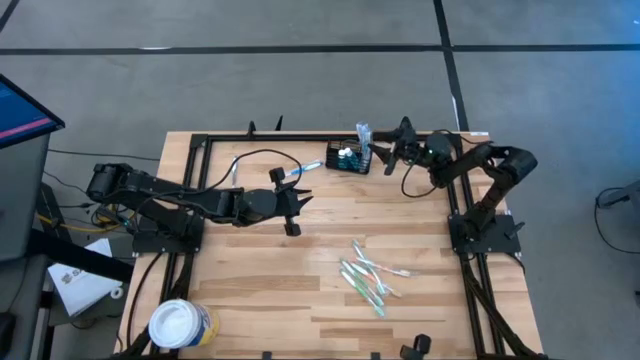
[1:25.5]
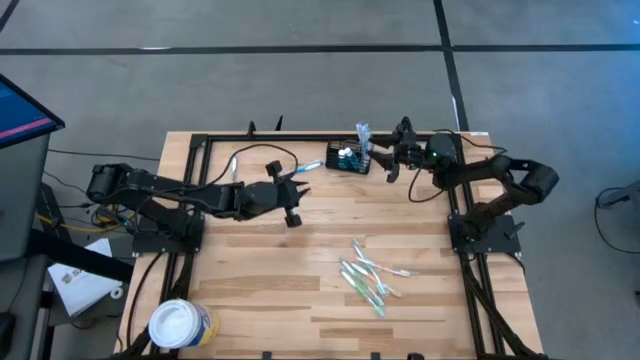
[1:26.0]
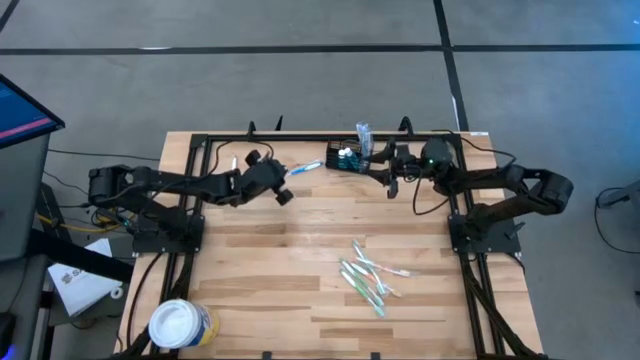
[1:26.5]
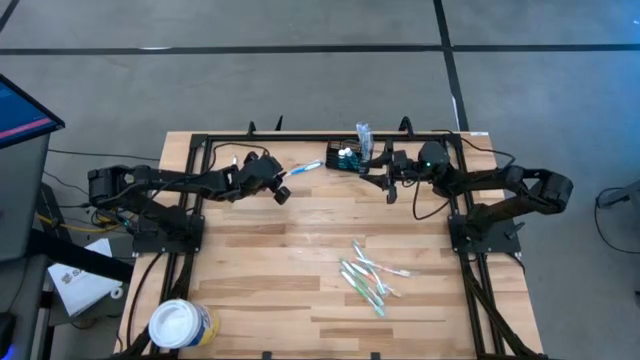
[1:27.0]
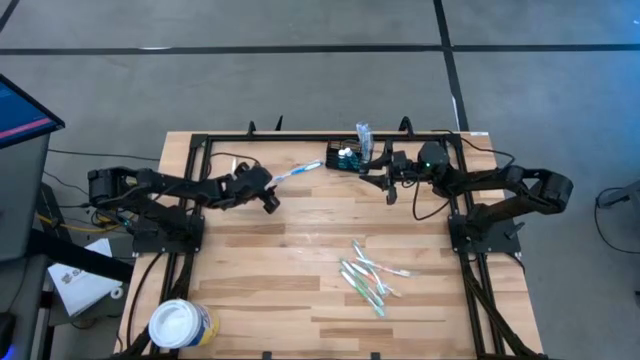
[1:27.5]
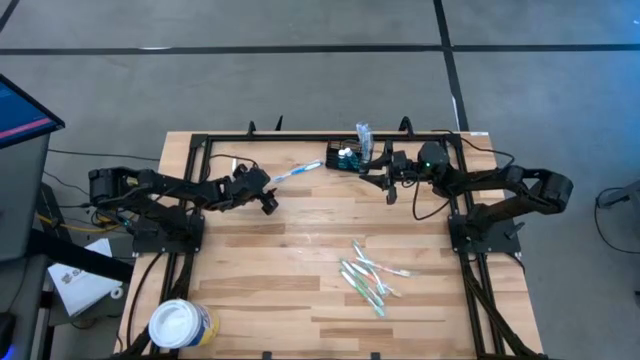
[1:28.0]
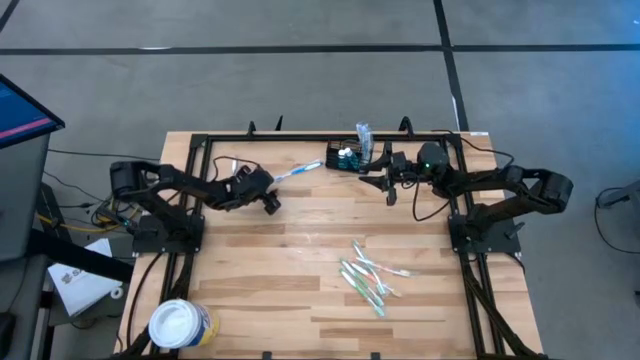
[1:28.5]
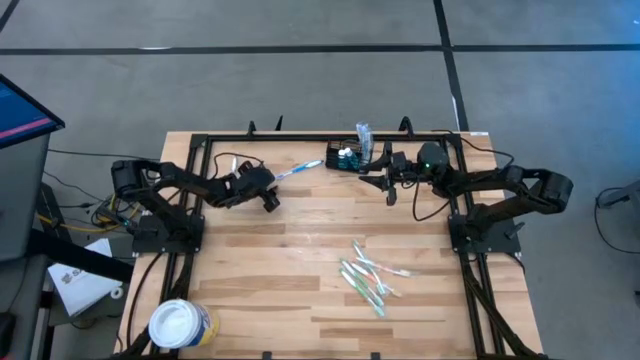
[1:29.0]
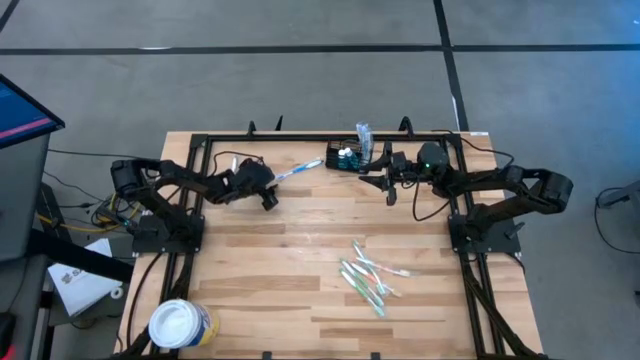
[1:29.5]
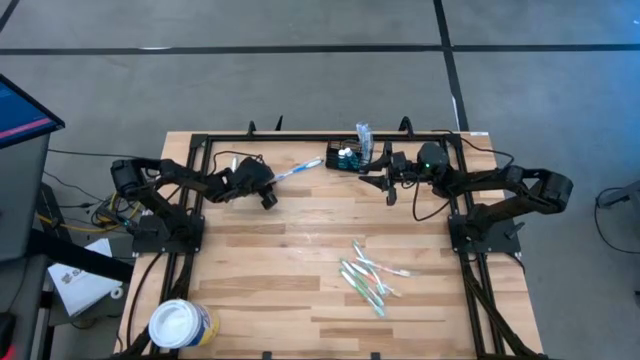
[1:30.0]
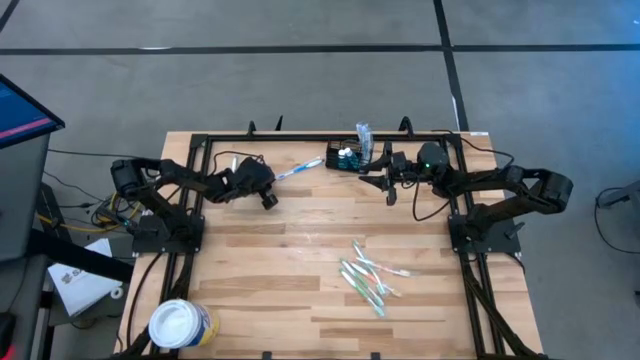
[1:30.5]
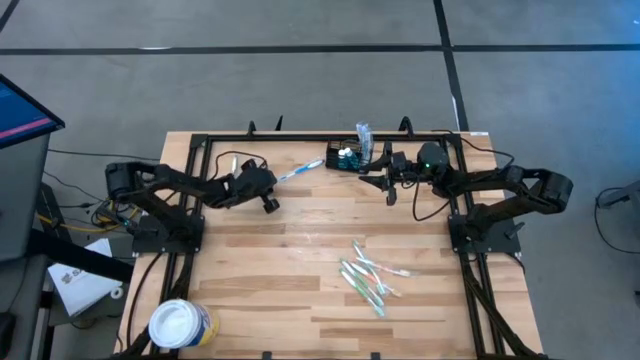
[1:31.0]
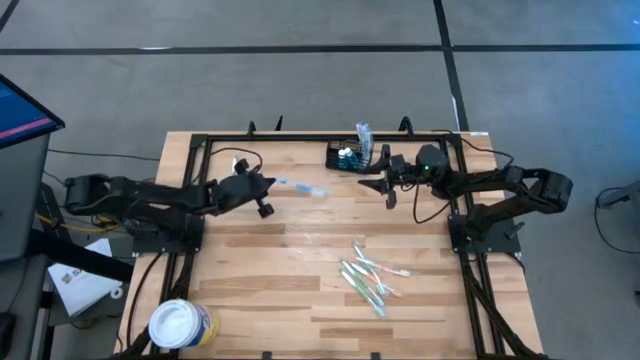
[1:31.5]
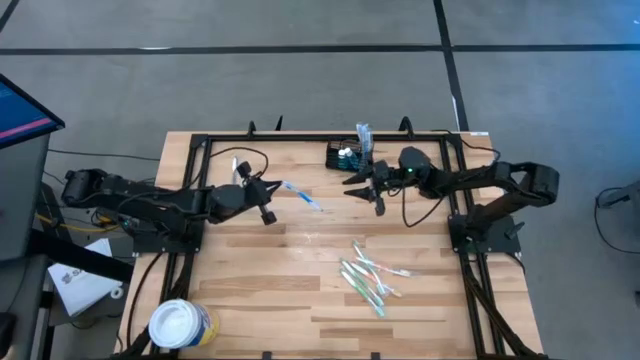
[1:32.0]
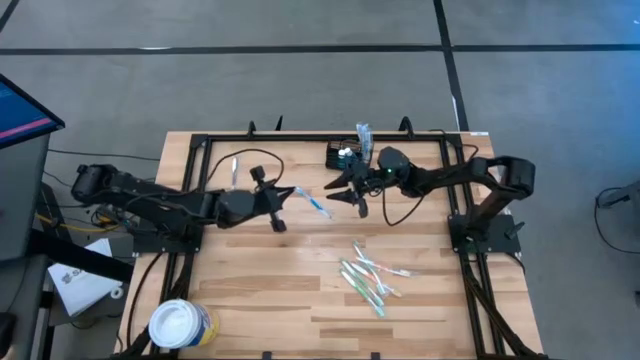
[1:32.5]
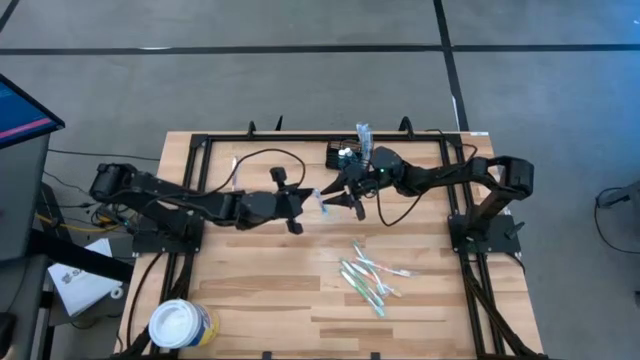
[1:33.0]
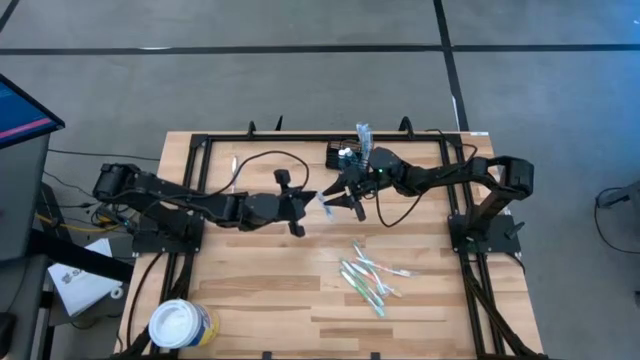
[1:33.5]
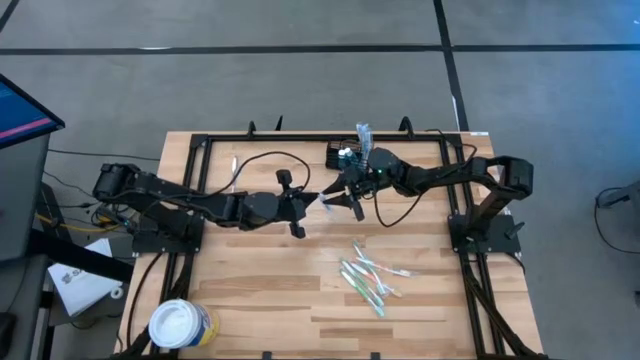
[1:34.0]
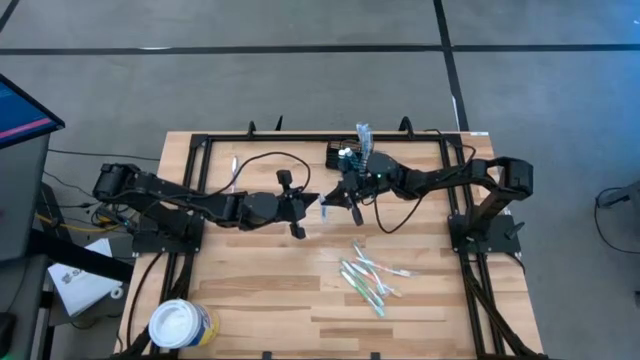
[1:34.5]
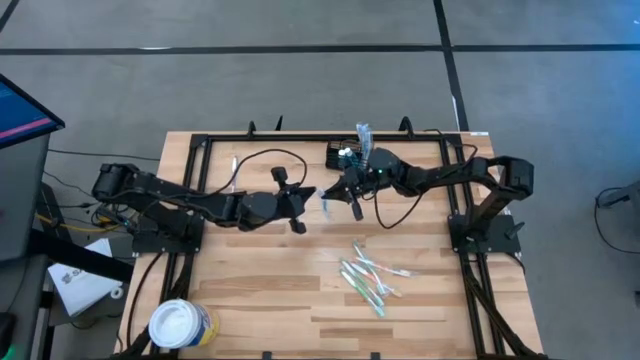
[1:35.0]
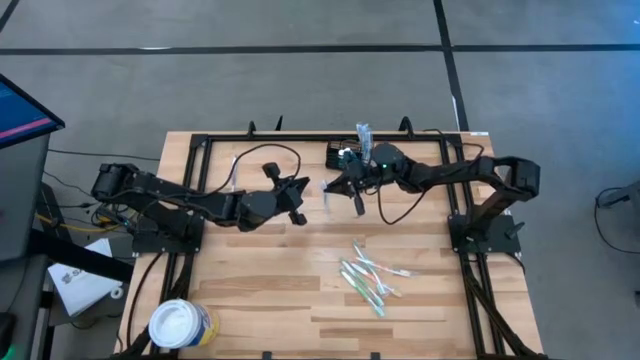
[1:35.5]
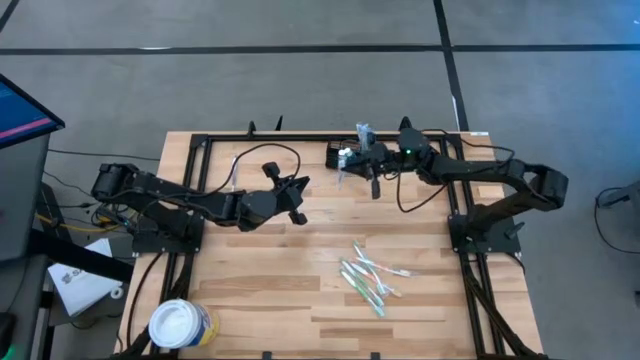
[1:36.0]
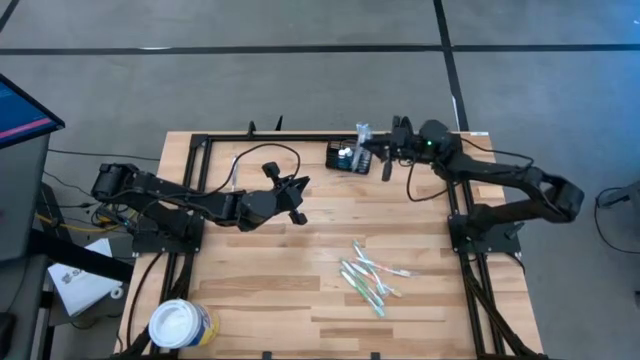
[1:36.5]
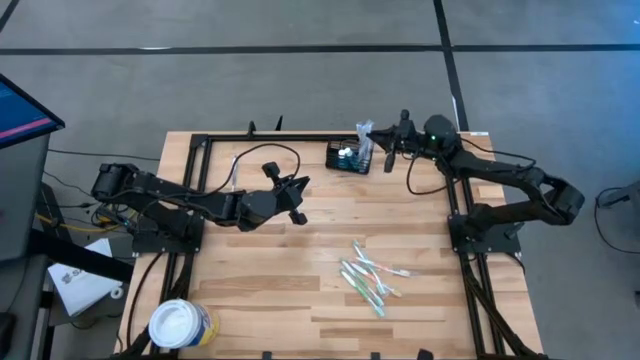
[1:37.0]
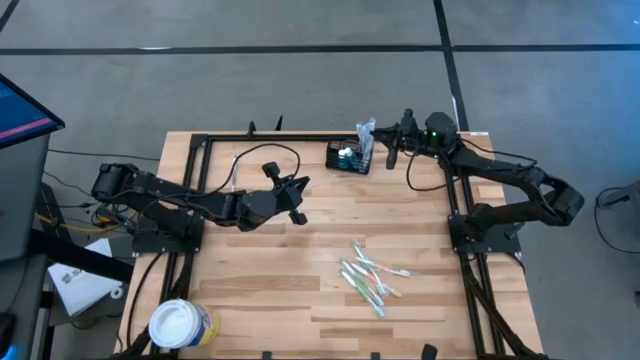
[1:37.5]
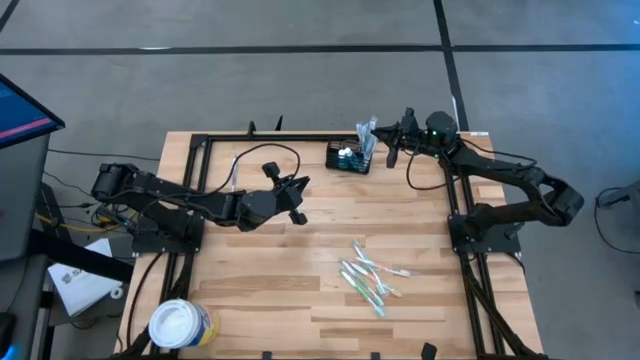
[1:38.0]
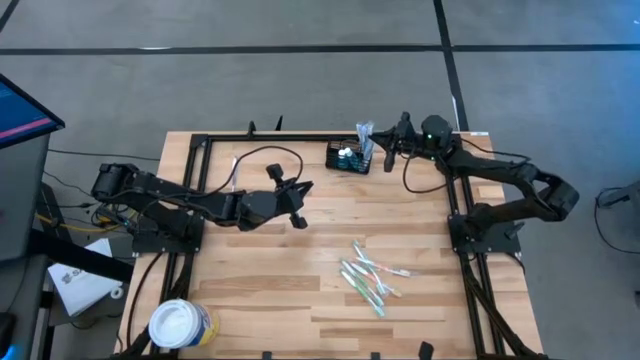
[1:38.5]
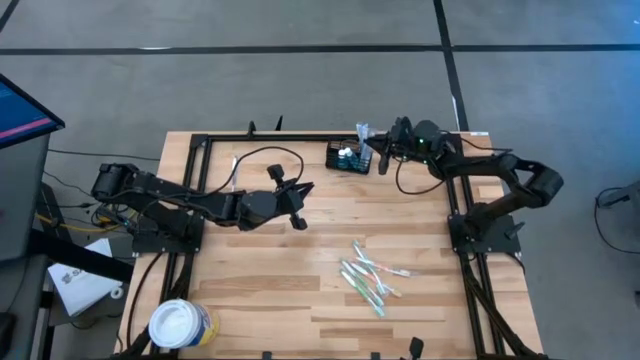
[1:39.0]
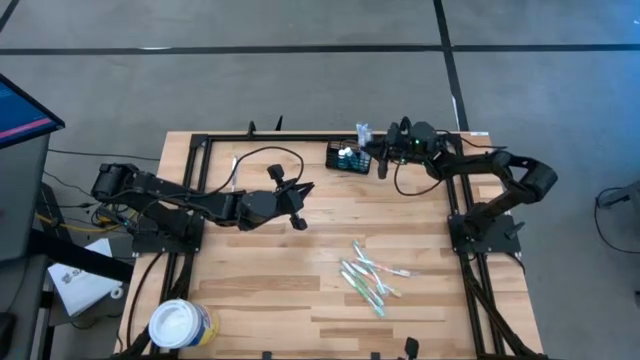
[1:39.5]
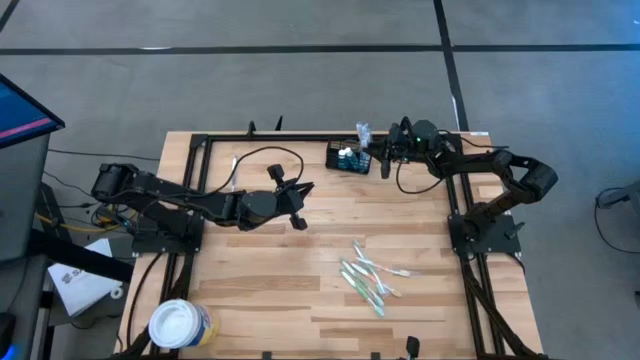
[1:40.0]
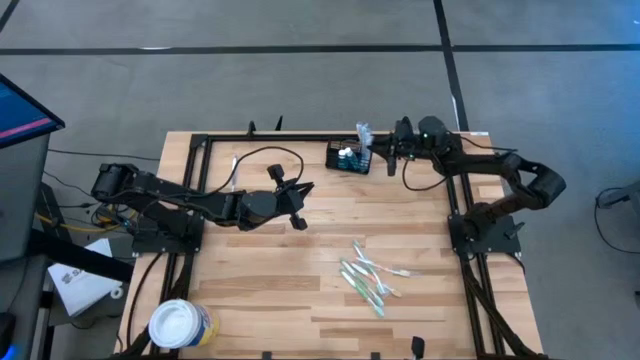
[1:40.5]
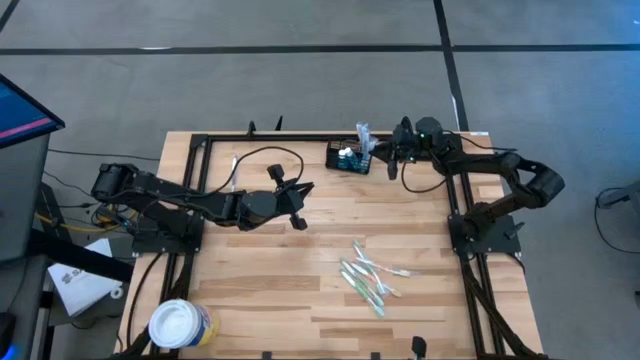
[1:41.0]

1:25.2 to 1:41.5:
Task: Pick & Place toothbrushing station
Put the blue toothbrush into the mesh organizer

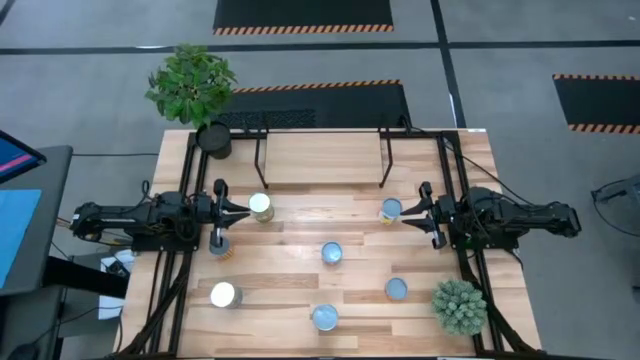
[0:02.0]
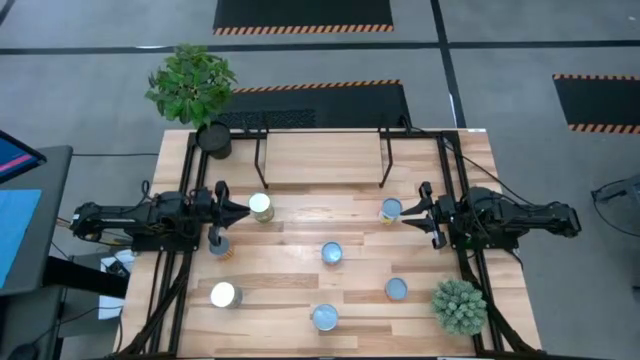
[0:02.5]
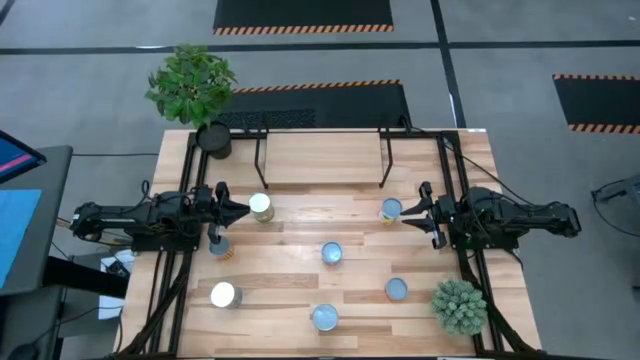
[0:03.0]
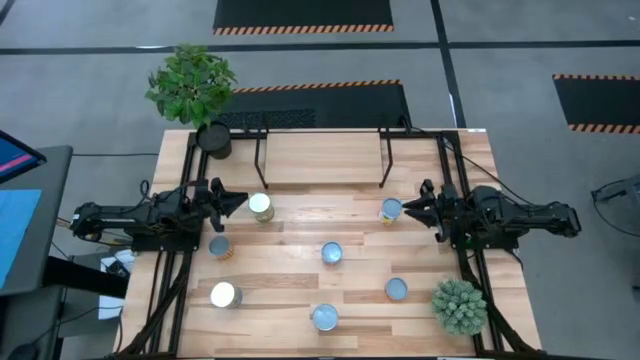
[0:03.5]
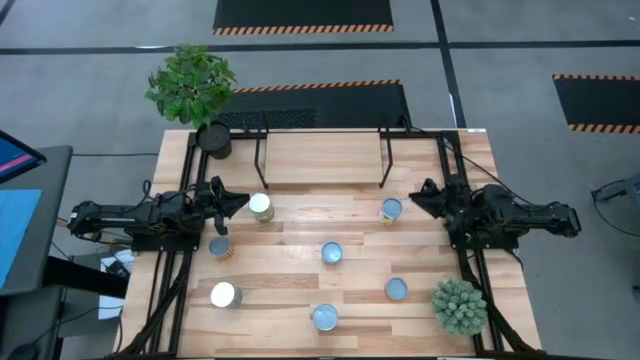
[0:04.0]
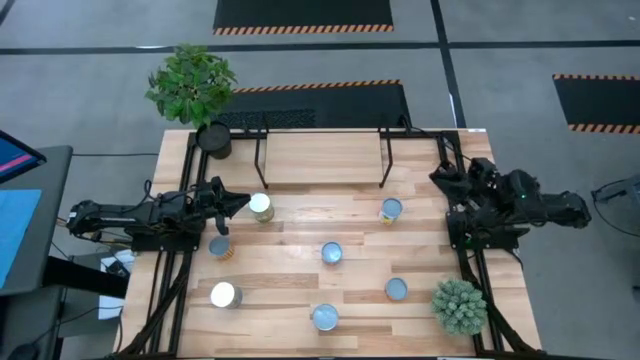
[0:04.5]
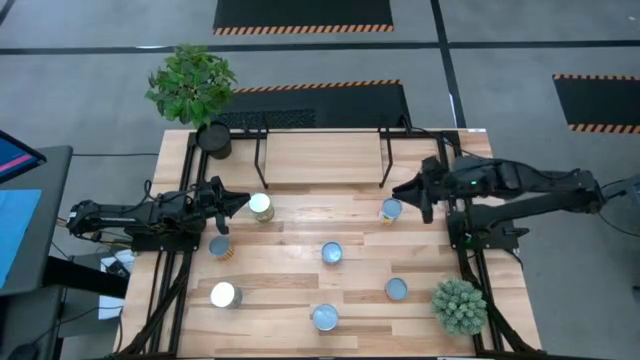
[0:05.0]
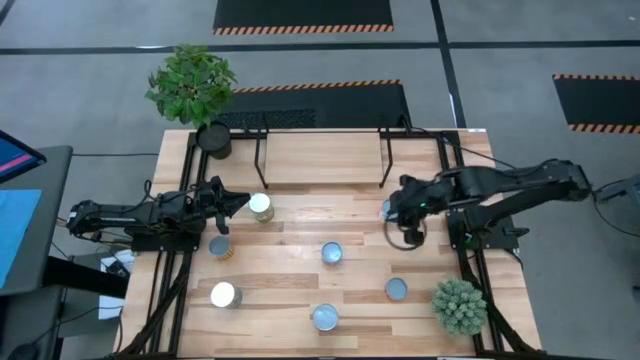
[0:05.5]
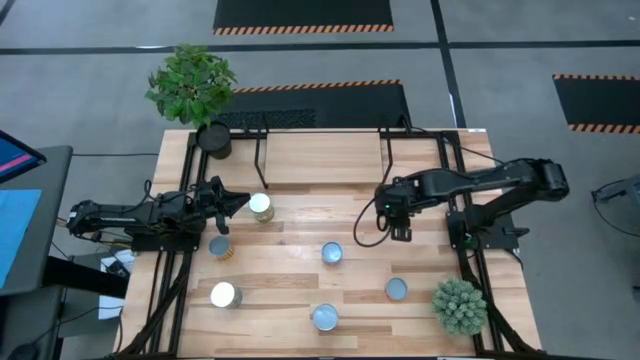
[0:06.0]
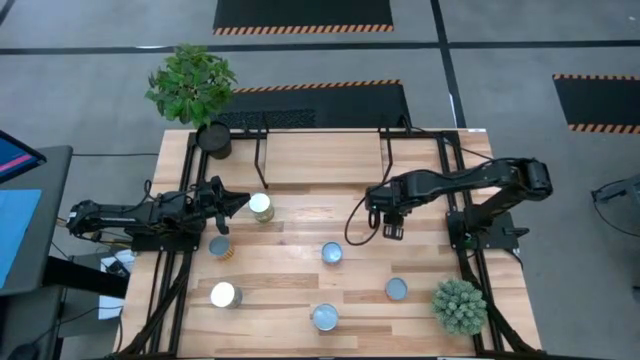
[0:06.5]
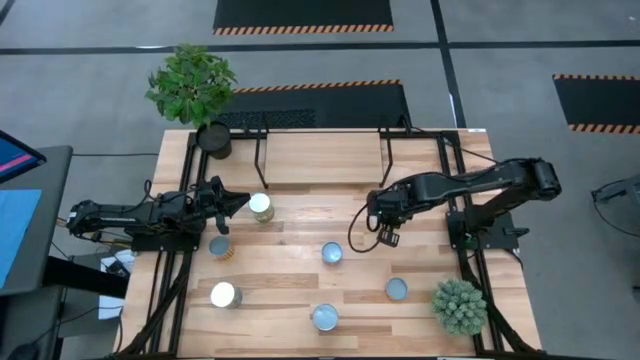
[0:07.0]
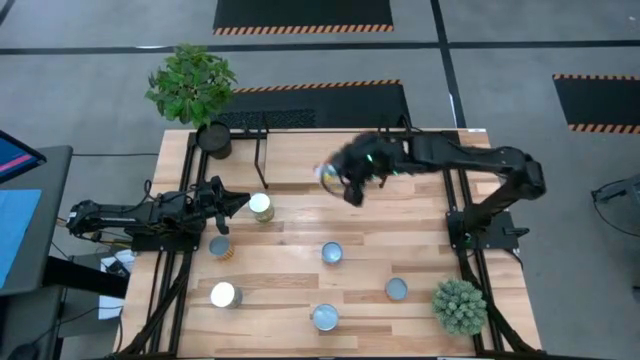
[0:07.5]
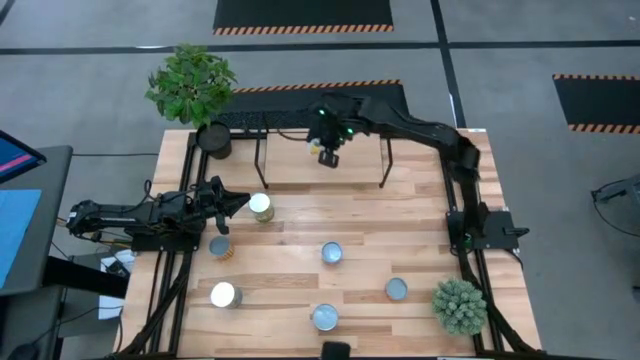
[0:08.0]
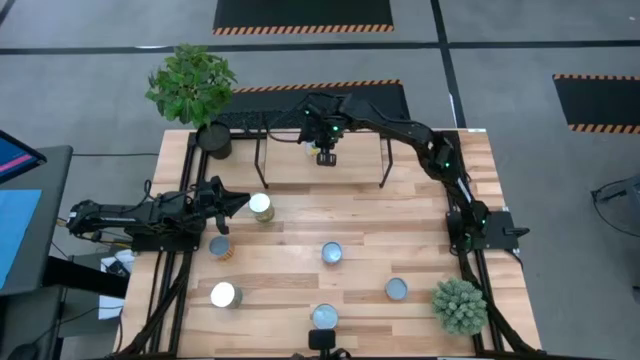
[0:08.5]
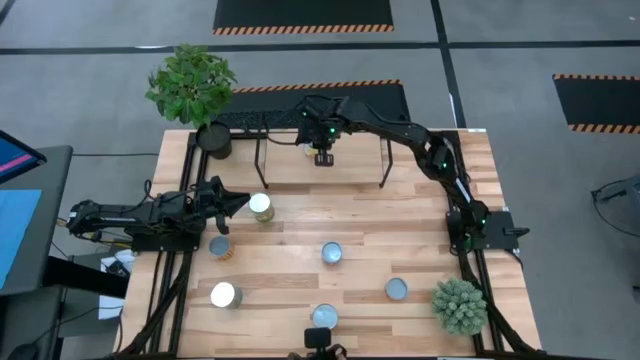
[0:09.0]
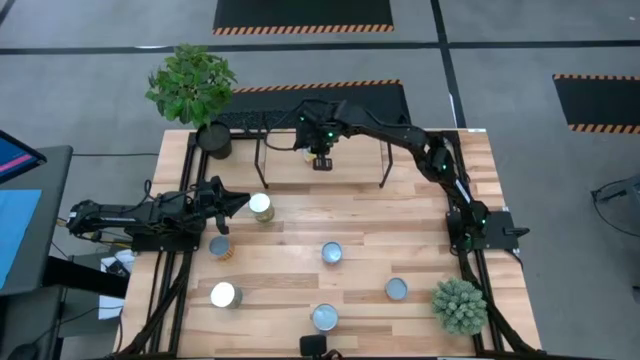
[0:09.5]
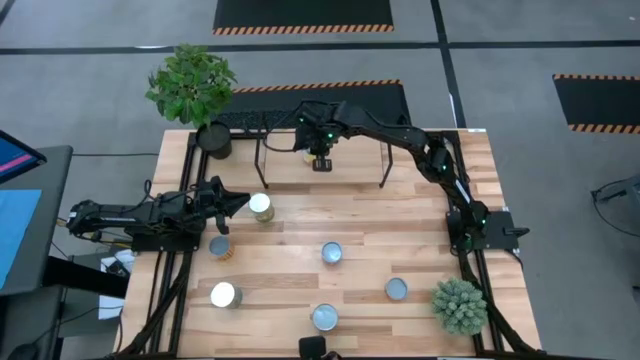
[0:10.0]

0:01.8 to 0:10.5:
Task: Pick and place cans onto a shelf
Put the canned pineapple on the shelf
